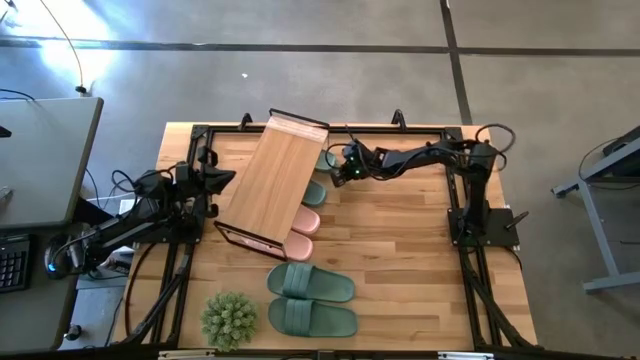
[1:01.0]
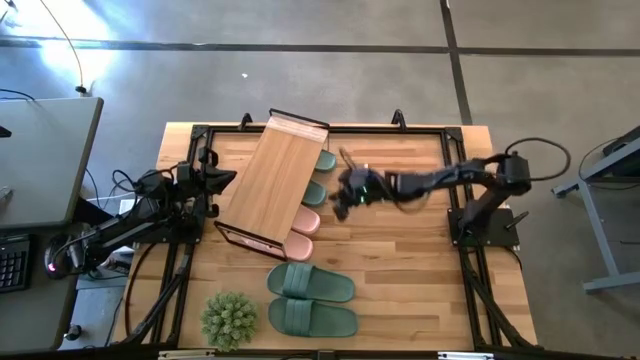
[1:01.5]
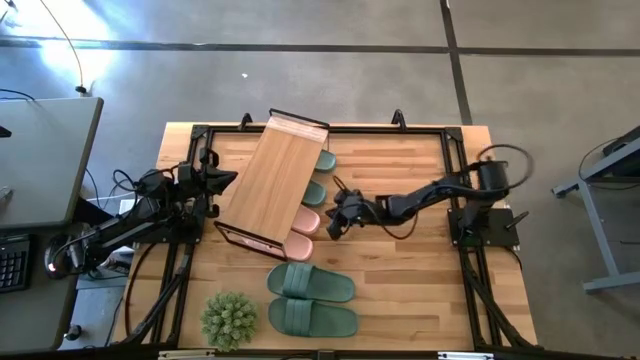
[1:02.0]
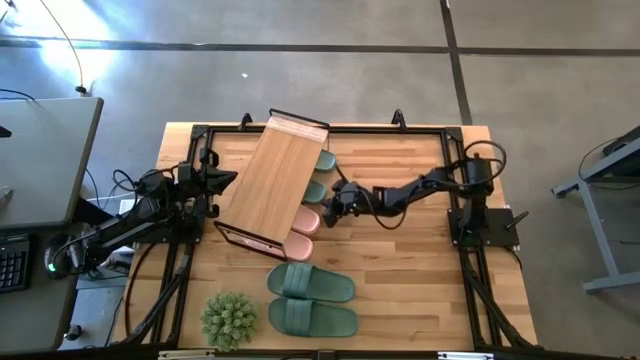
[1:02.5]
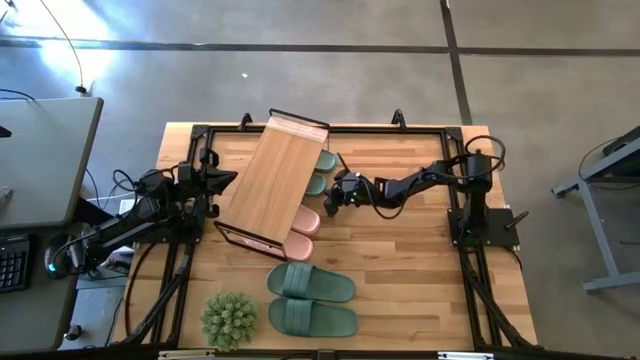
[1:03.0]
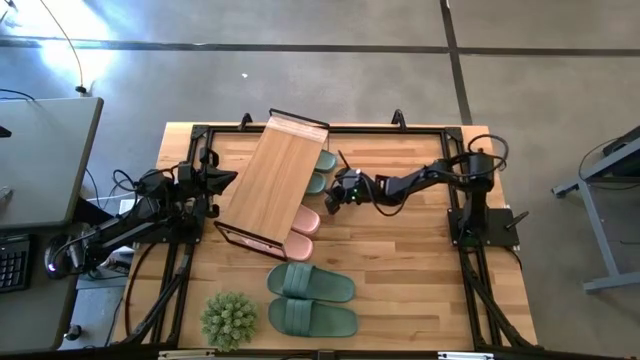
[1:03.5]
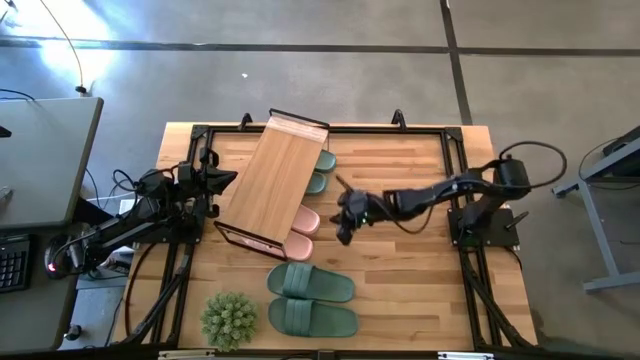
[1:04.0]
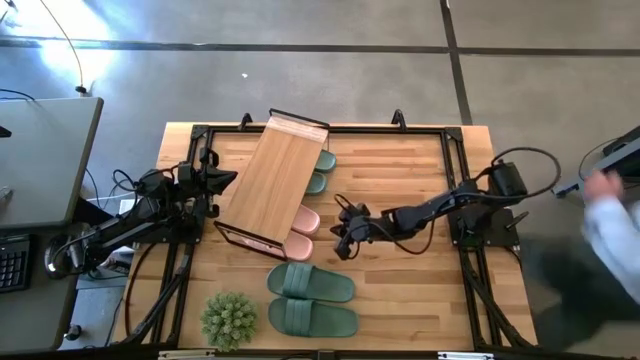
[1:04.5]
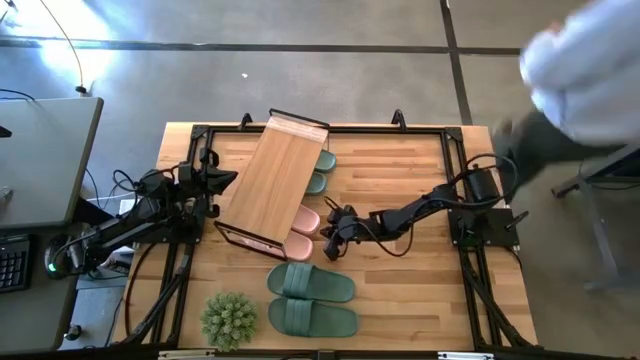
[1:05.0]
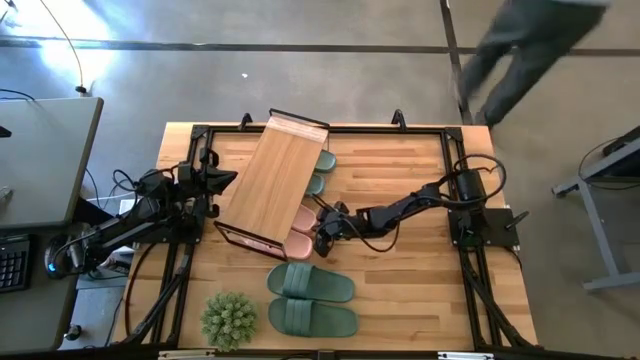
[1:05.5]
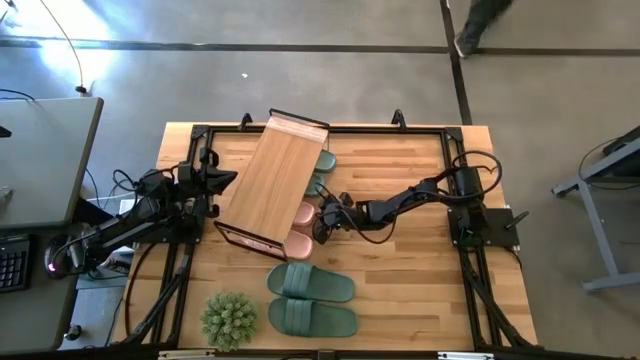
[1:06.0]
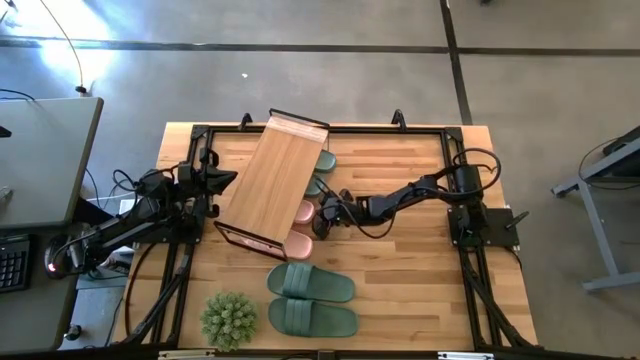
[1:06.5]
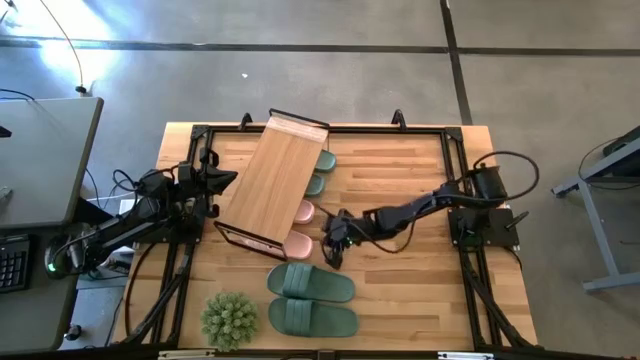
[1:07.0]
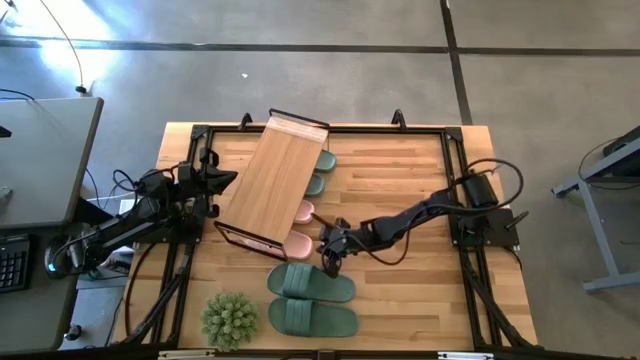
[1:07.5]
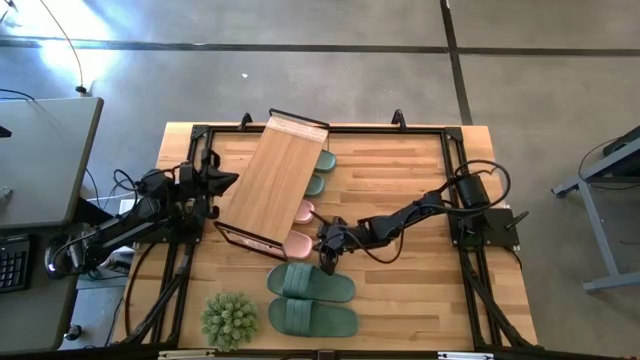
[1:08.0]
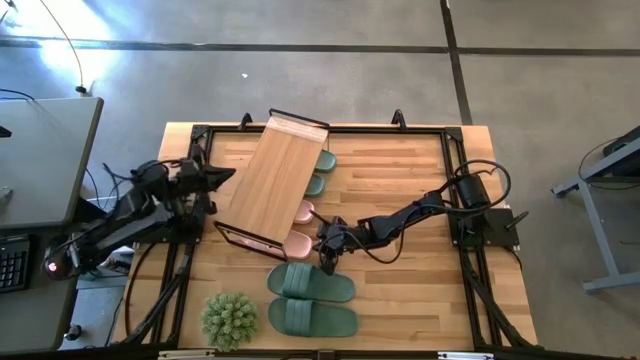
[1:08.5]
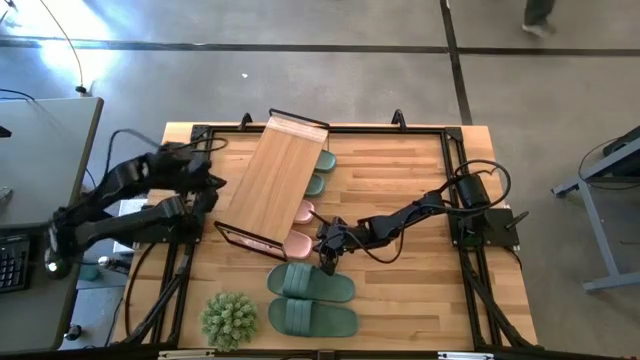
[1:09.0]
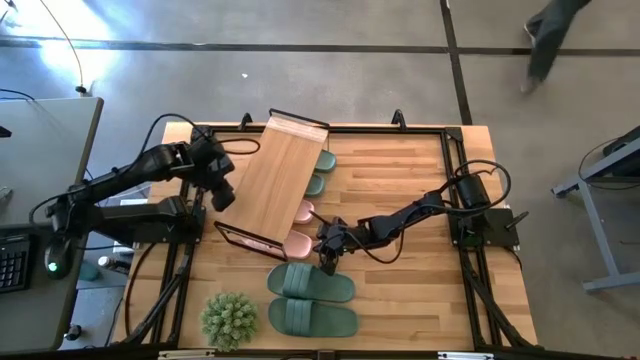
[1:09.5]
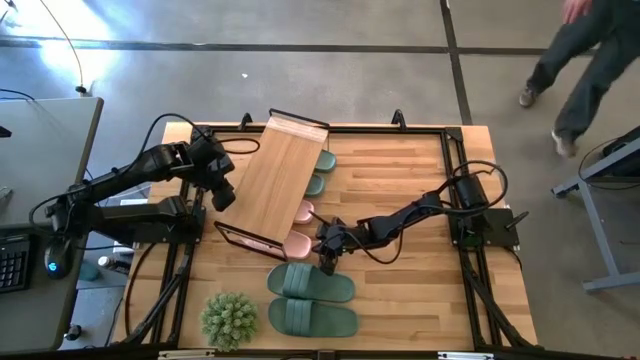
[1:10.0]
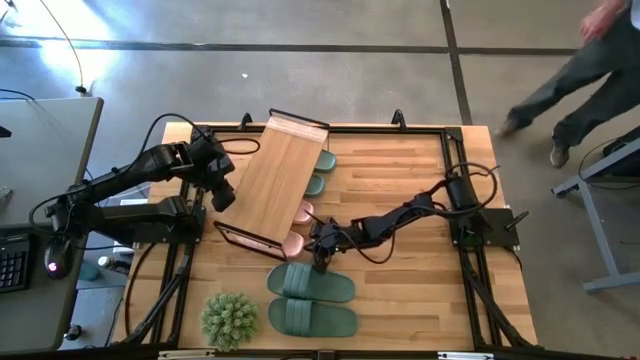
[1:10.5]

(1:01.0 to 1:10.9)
Task: Pick and place slides into the shelf
Adjust the slides under the shelf

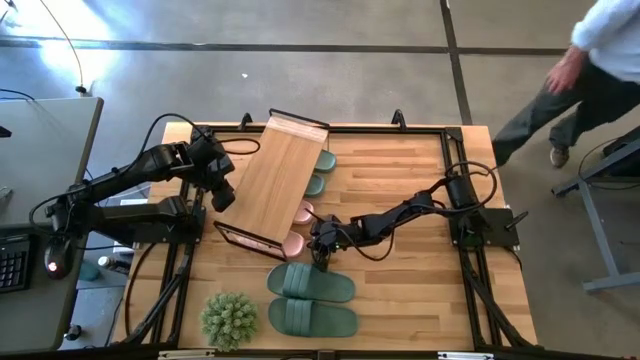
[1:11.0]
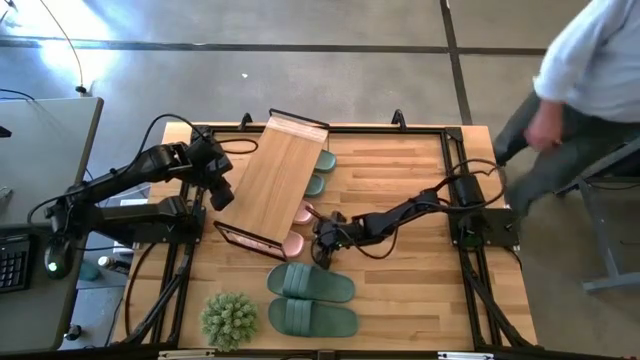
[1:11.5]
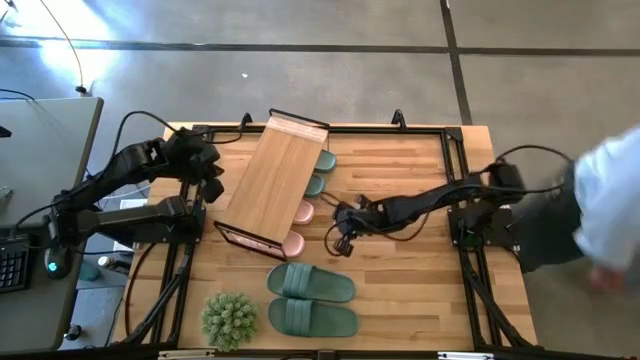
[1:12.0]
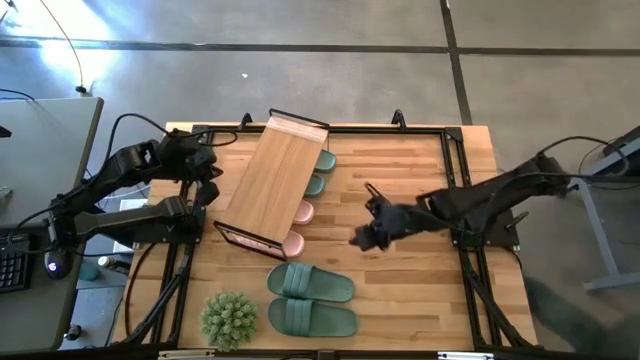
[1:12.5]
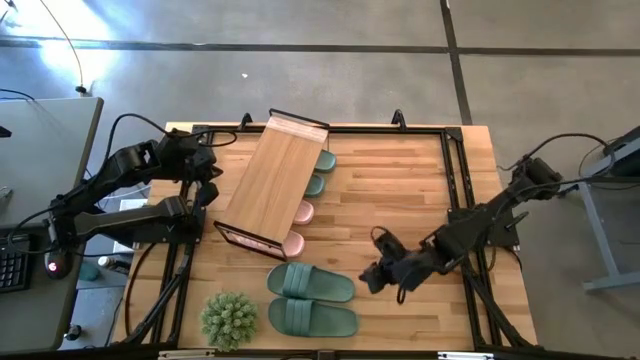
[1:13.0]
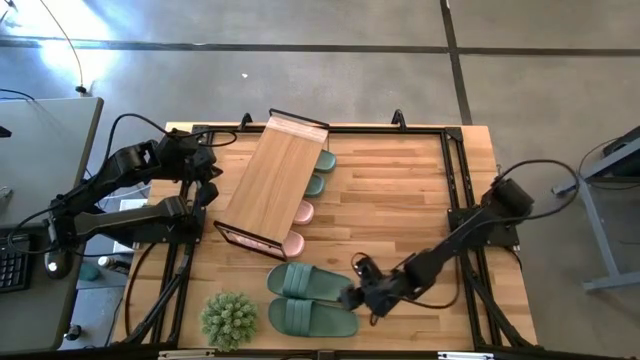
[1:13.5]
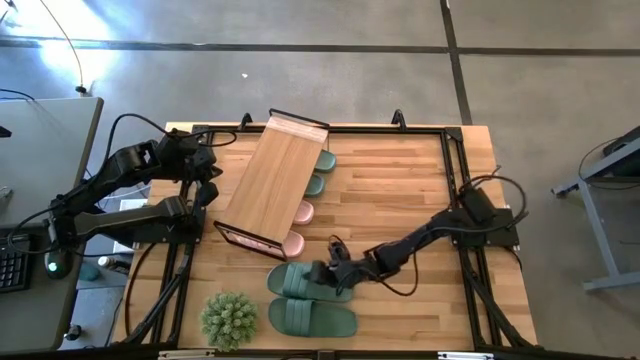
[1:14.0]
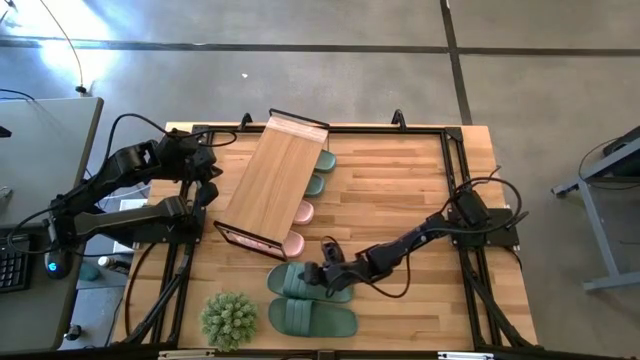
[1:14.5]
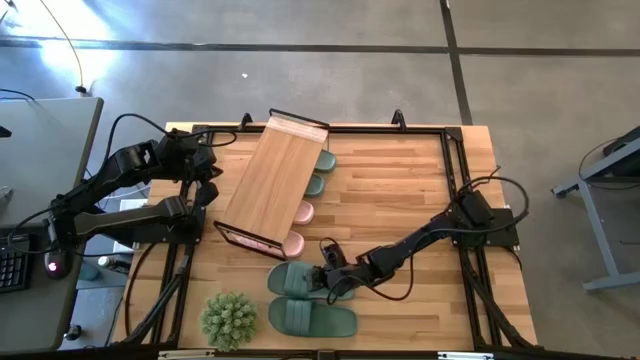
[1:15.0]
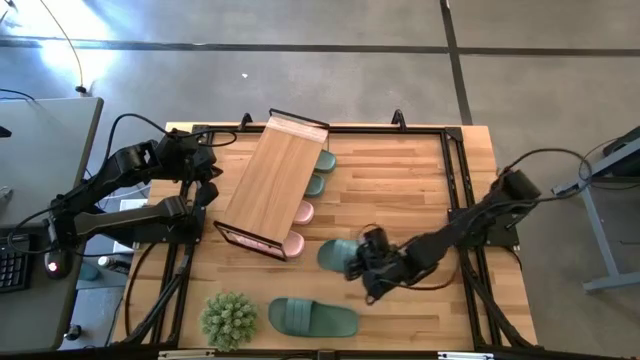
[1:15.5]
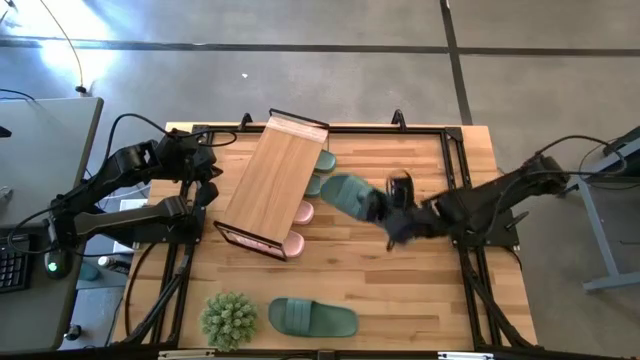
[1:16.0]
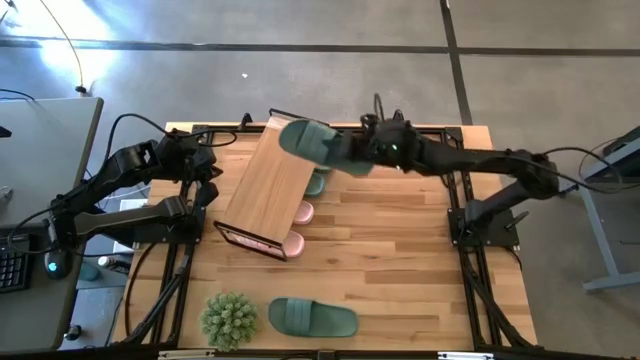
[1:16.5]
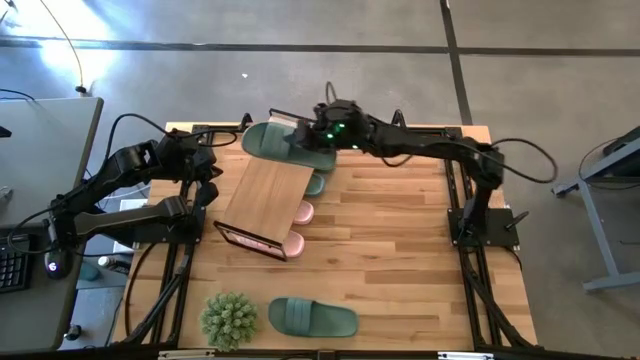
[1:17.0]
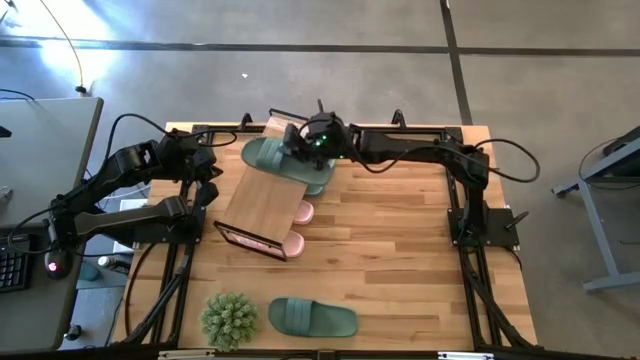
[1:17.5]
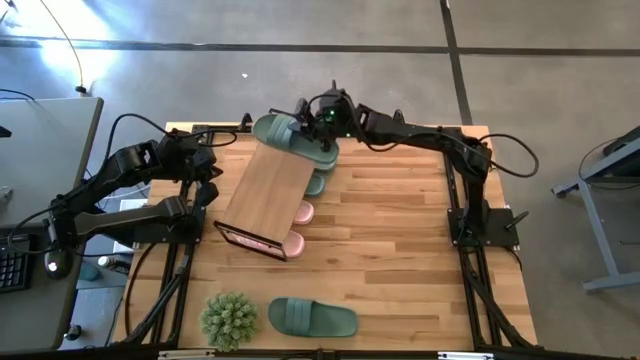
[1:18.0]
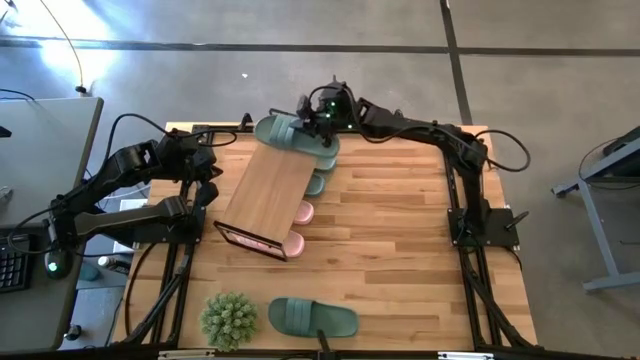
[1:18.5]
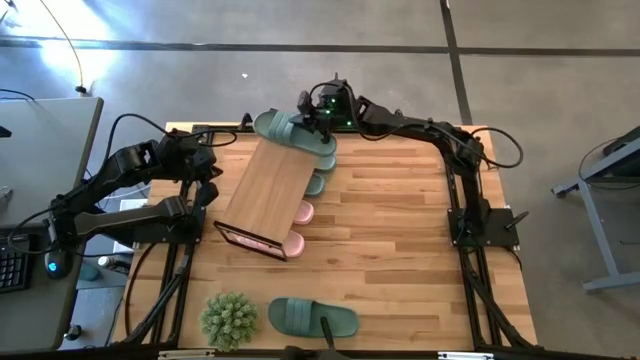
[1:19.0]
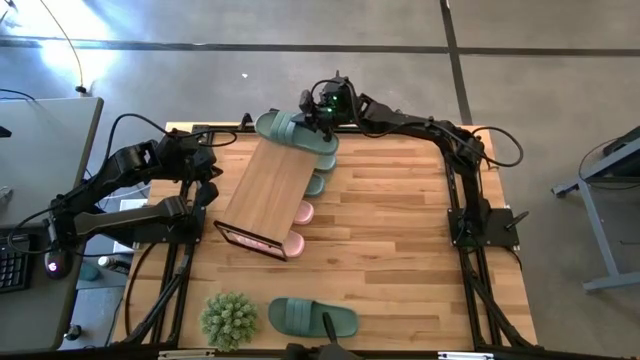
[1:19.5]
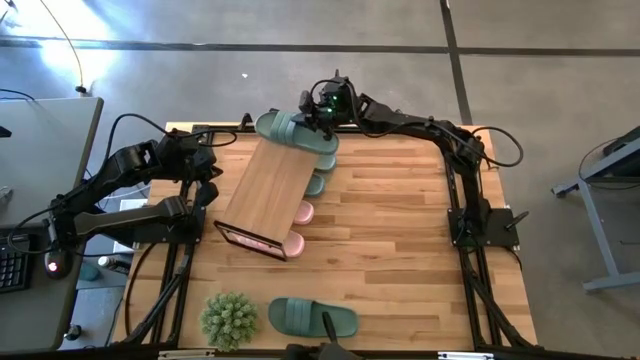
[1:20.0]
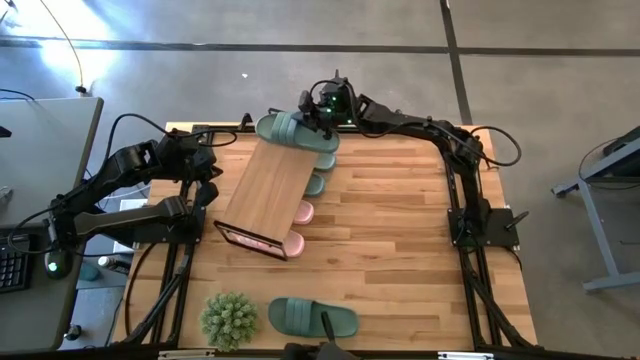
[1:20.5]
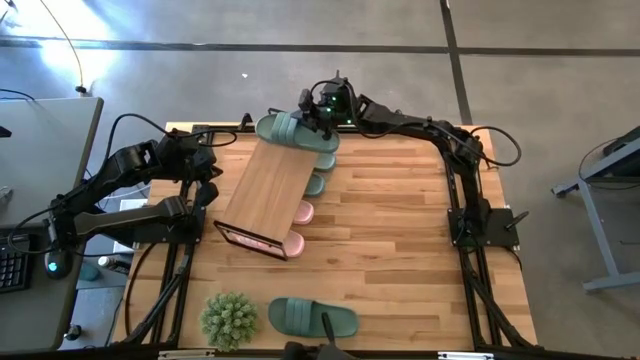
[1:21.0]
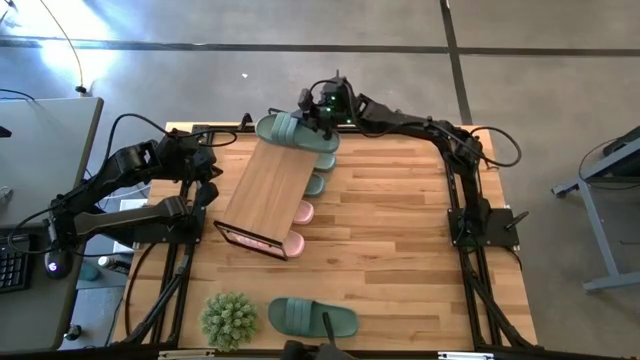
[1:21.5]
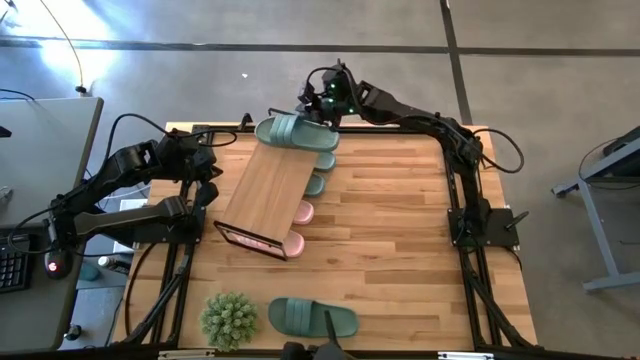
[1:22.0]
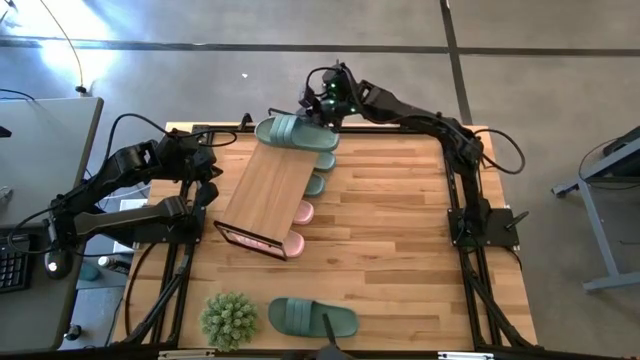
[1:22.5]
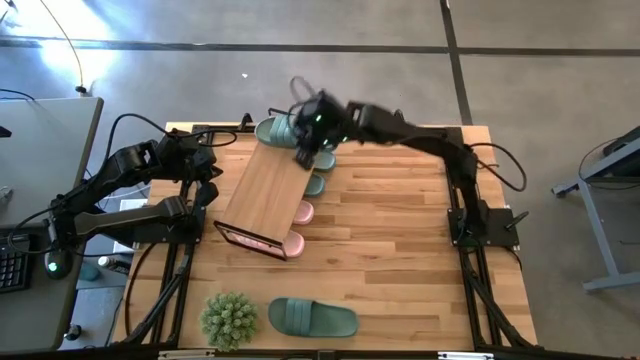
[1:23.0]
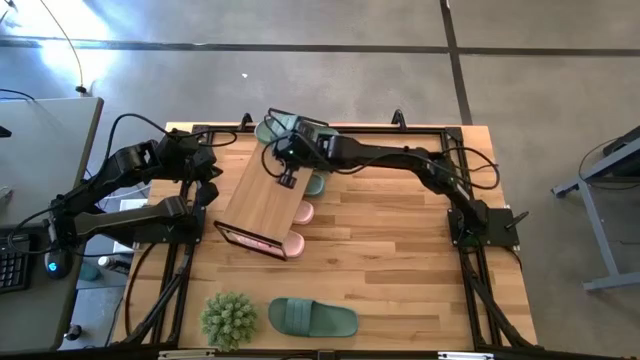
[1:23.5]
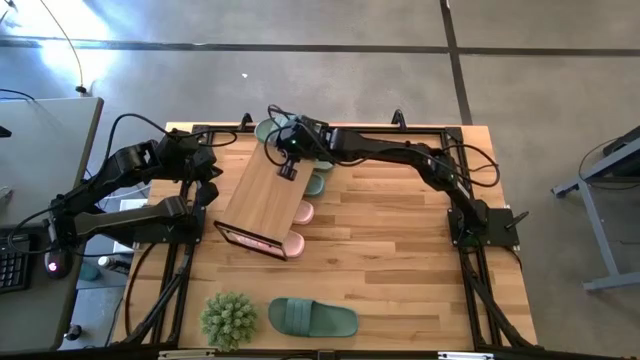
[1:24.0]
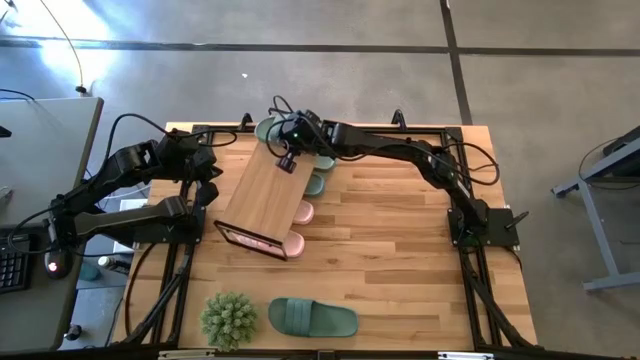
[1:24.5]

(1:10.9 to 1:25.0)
Put the green slide on the shelf
